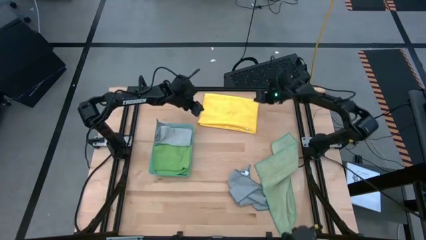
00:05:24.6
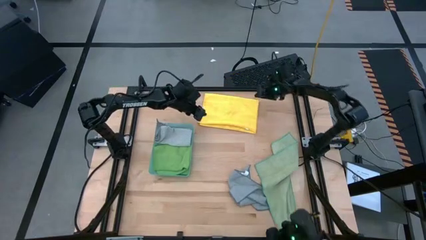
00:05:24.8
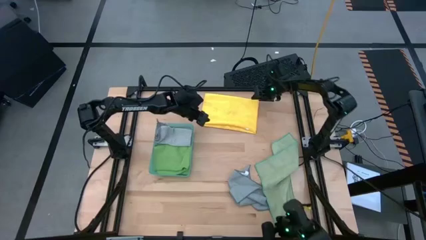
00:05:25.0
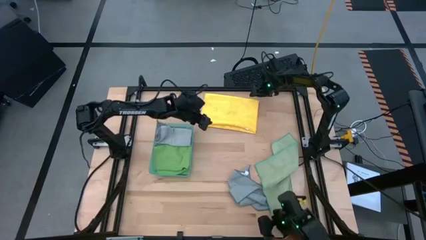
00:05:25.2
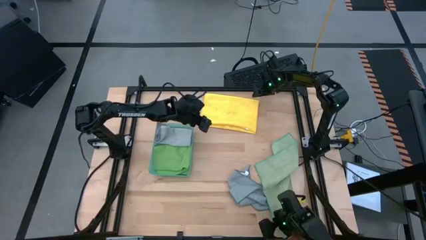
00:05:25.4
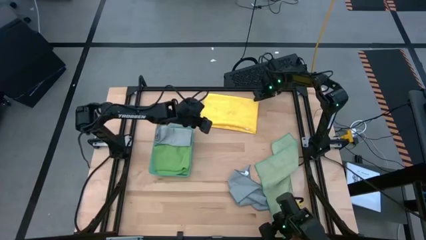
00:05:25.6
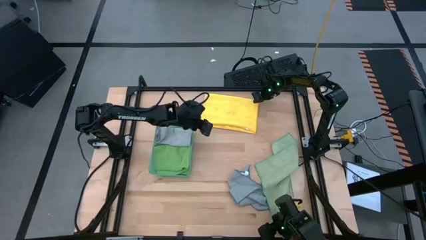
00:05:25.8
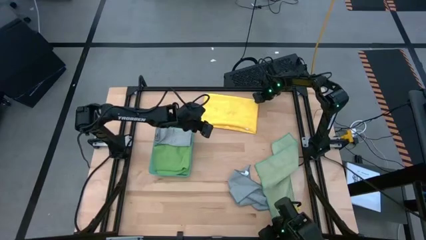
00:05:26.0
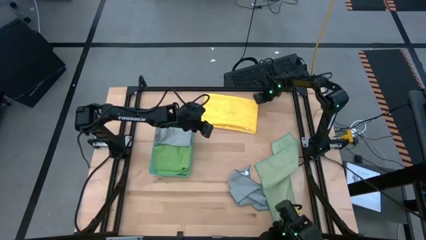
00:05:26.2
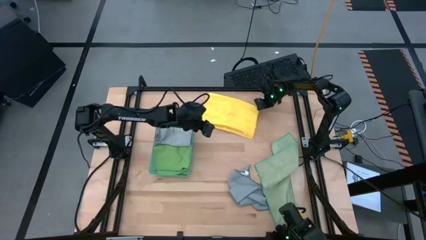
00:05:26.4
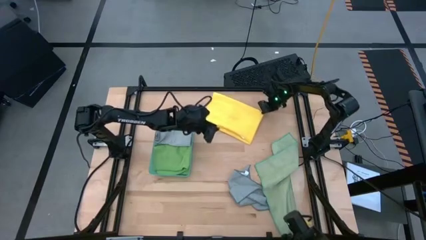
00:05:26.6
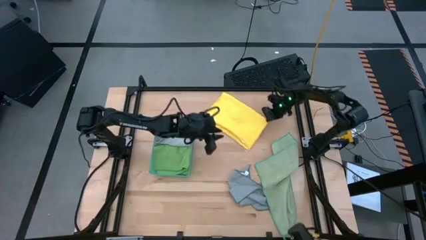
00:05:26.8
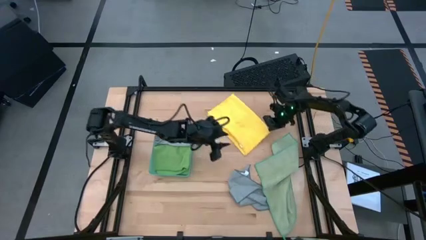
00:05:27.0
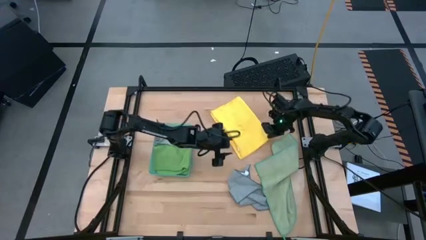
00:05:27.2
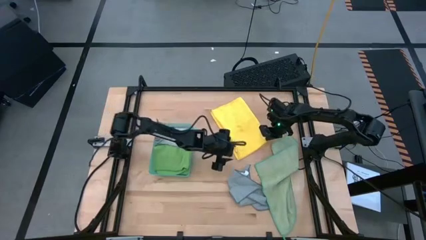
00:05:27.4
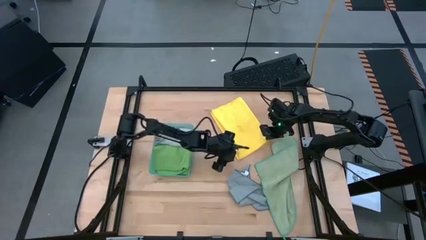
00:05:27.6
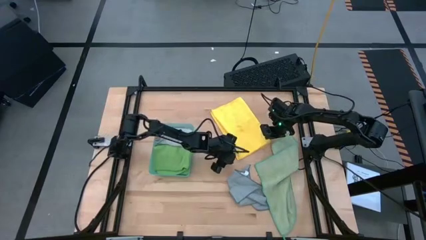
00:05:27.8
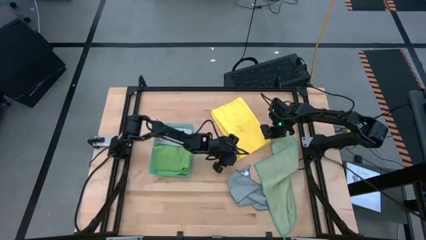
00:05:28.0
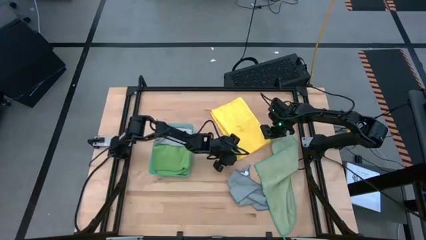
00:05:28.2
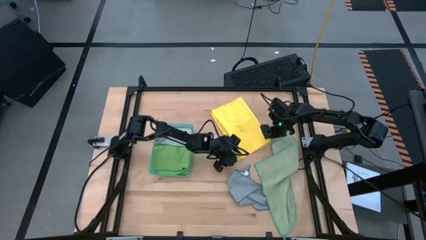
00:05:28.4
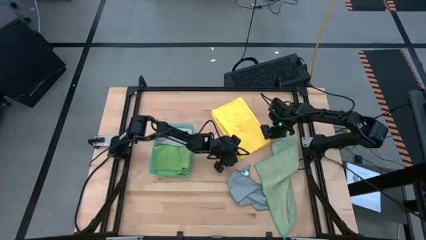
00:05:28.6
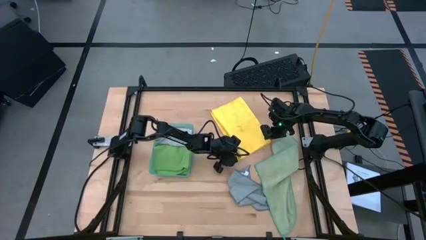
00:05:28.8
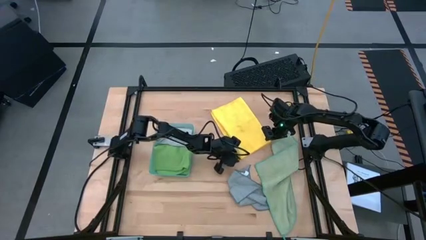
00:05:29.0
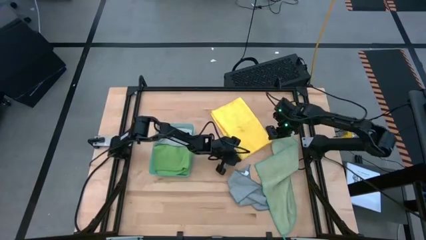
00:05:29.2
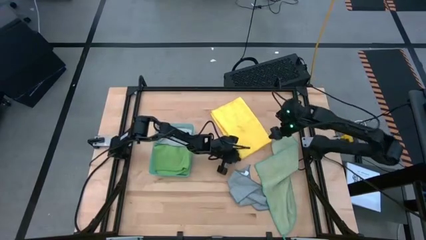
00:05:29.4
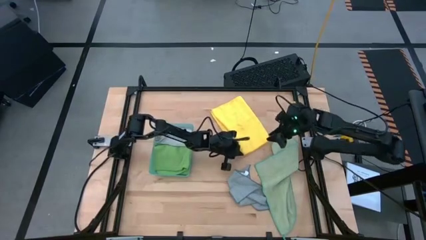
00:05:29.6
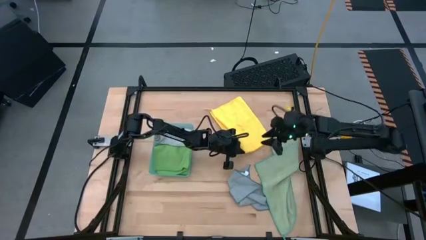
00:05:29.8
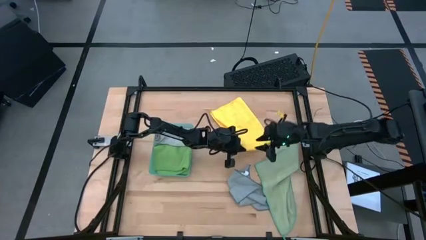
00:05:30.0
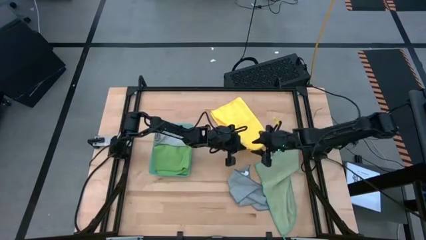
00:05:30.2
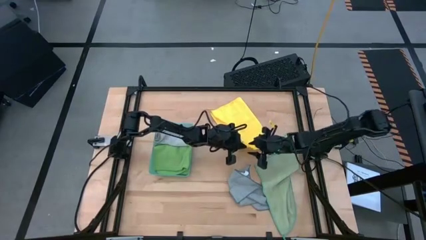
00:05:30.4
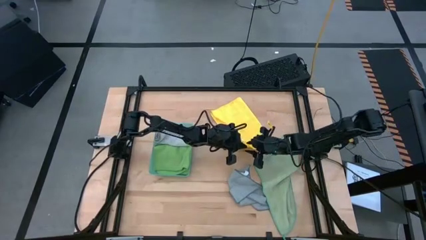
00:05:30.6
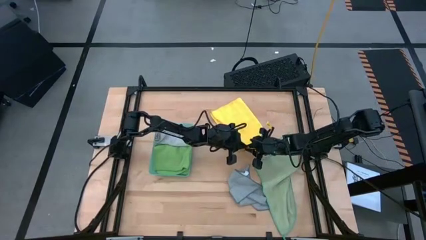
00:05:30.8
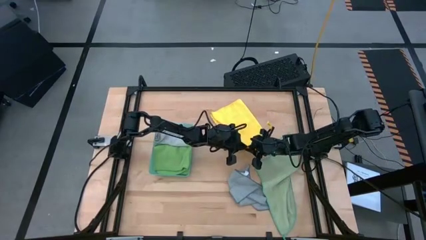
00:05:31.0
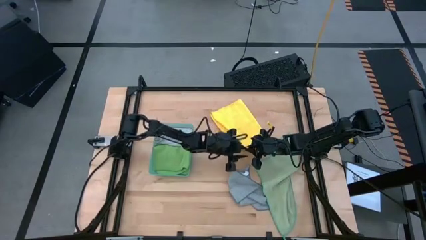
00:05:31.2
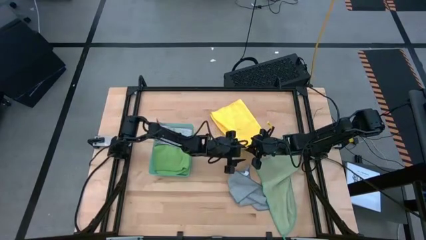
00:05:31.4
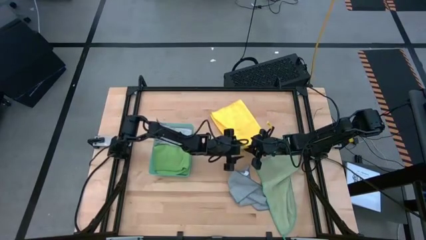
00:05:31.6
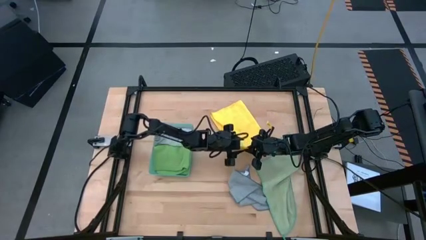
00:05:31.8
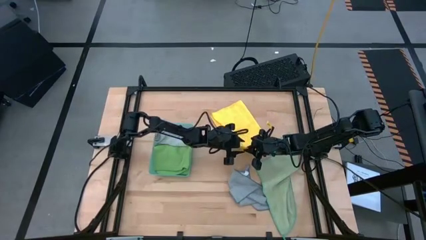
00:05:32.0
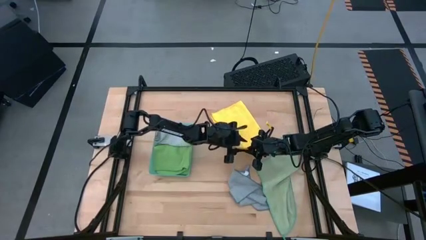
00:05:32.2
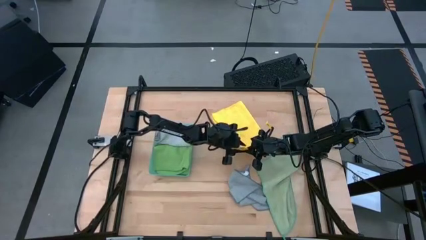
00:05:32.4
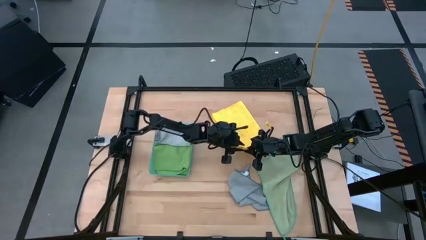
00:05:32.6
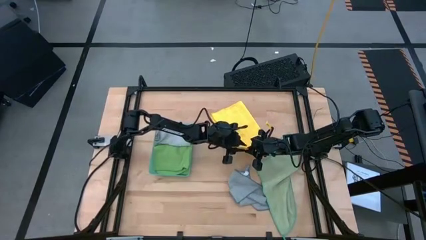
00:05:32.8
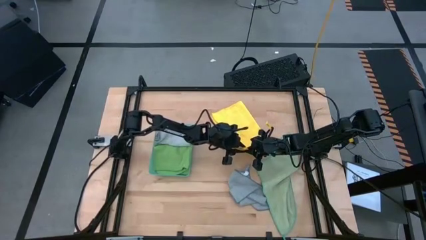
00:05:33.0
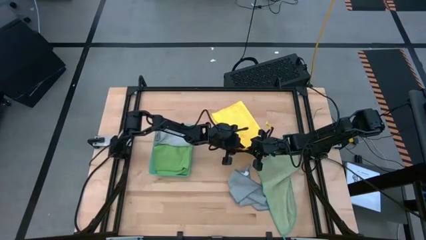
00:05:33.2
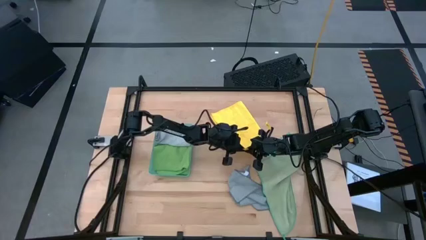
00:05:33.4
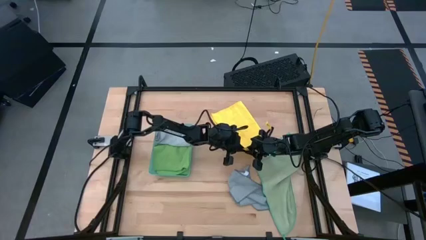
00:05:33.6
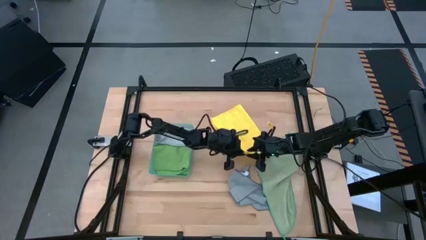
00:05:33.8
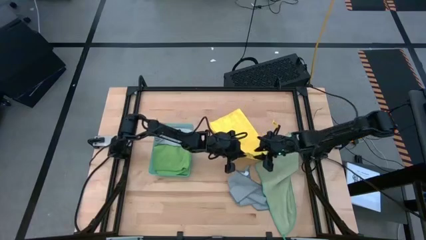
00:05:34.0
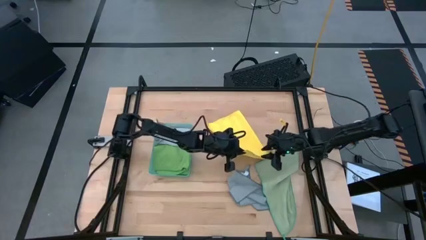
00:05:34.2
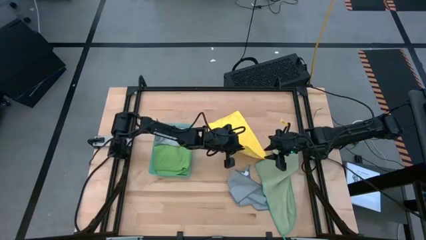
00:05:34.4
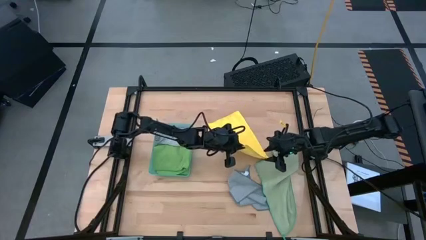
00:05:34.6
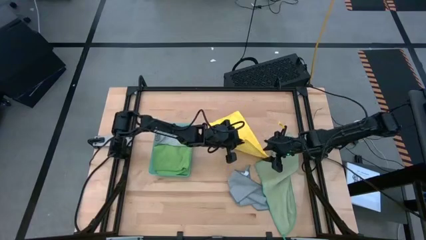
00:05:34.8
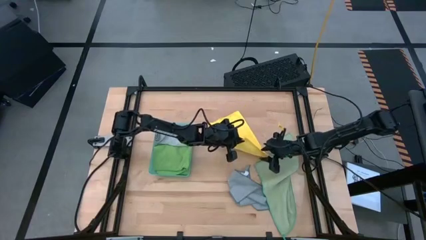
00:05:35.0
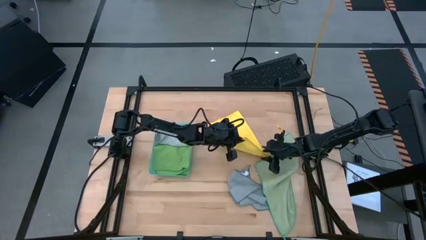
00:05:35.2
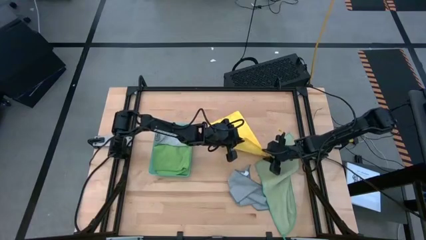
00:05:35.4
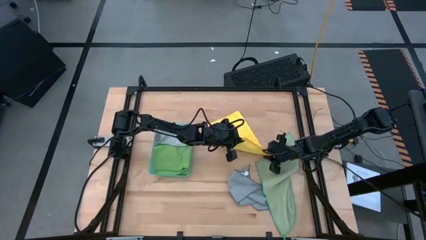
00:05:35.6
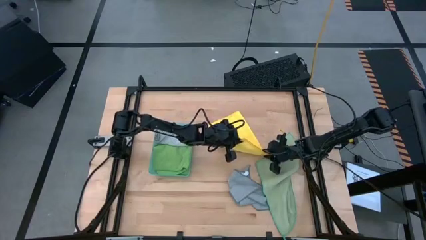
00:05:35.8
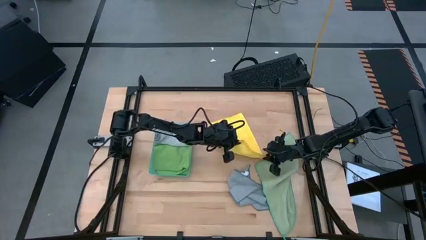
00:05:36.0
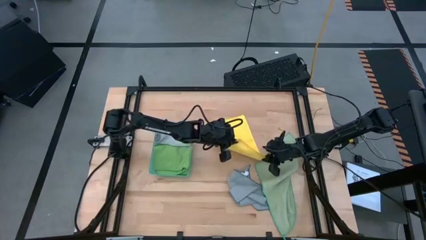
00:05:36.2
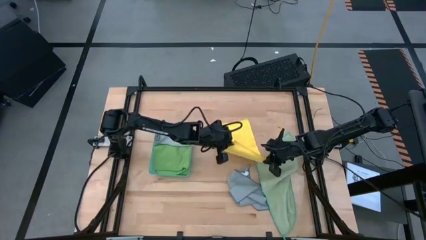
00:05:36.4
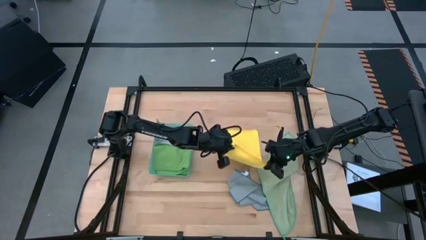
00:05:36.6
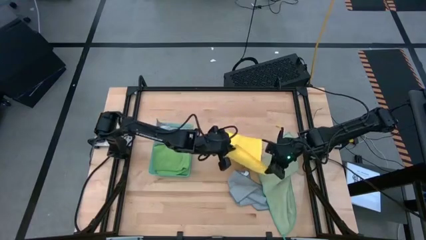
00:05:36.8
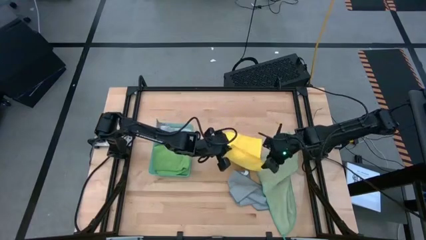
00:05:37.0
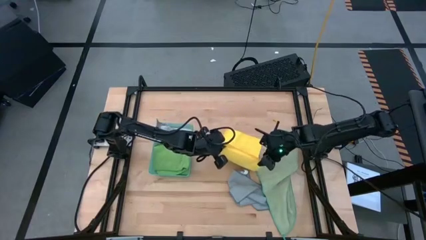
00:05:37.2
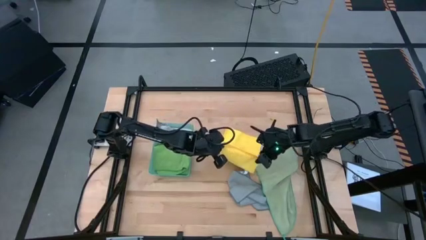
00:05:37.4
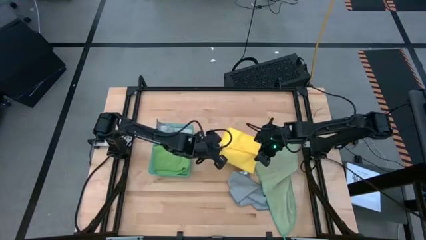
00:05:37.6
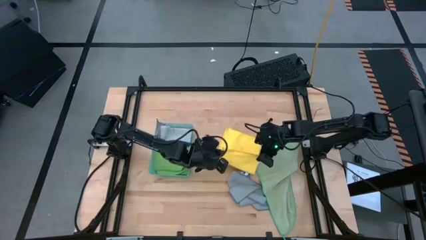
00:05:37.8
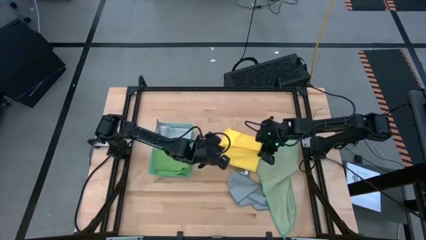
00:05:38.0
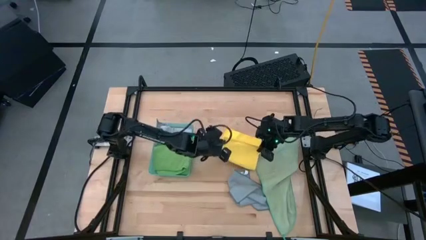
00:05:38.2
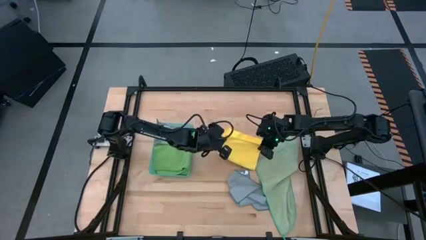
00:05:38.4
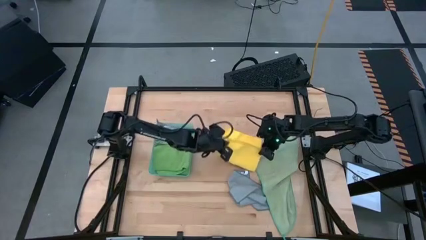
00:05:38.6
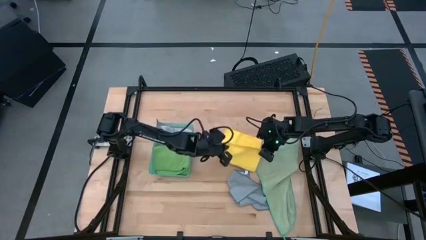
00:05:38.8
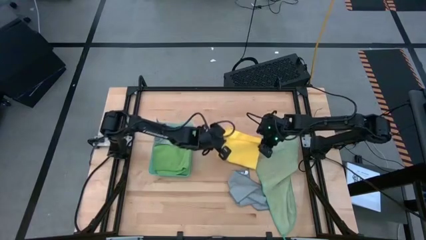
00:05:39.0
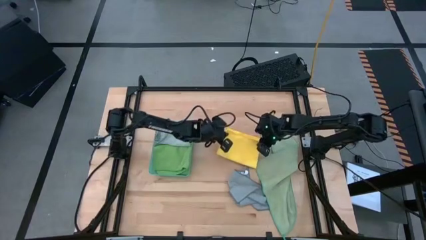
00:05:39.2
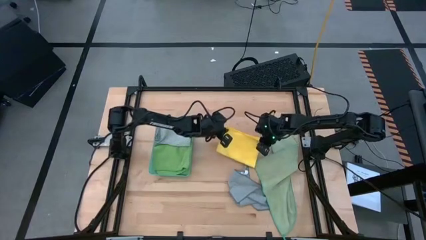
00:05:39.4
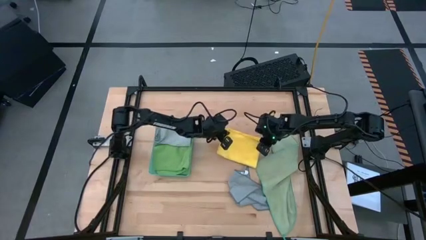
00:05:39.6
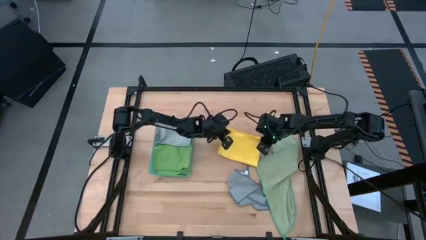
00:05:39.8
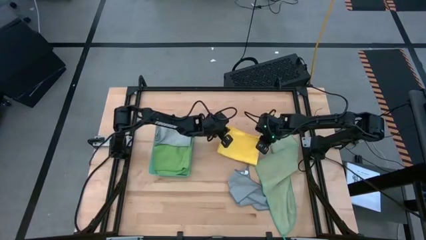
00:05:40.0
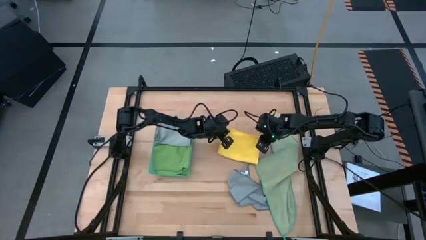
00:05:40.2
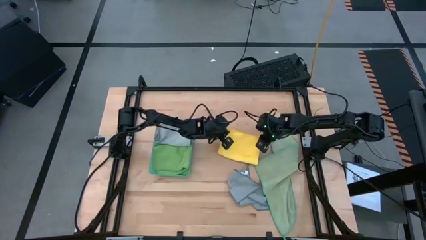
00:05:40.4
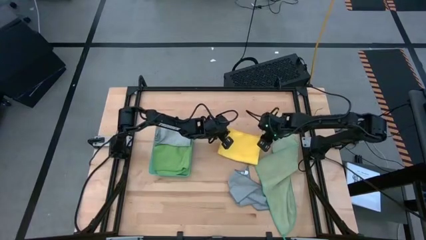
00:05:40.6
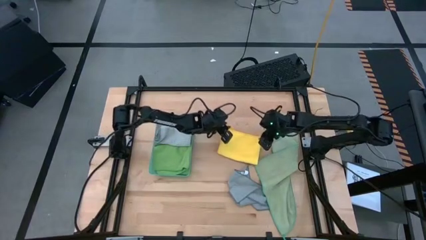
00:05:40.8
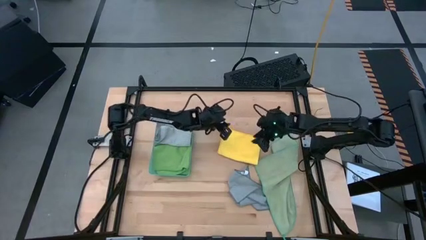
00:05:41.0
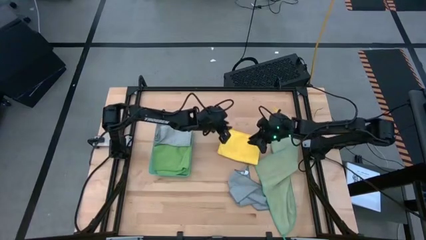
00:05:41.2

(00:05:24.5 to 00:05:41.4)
Task: Fold microfiber towels
Fold the yellow microfiber cloth
